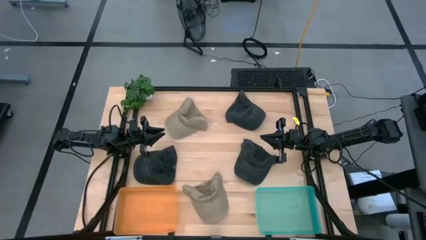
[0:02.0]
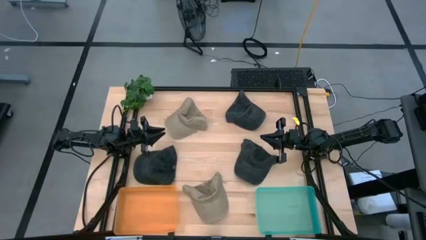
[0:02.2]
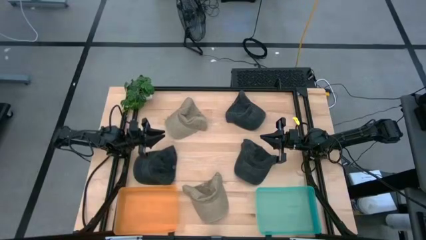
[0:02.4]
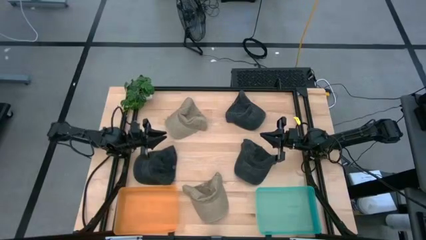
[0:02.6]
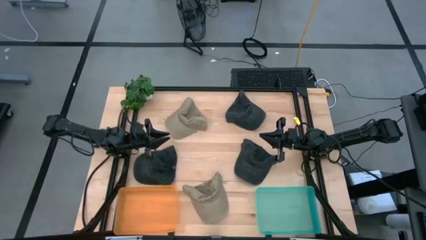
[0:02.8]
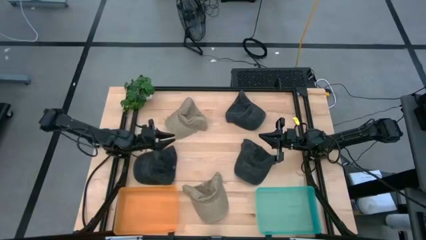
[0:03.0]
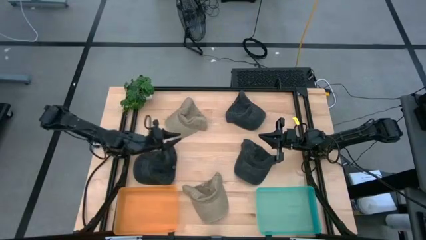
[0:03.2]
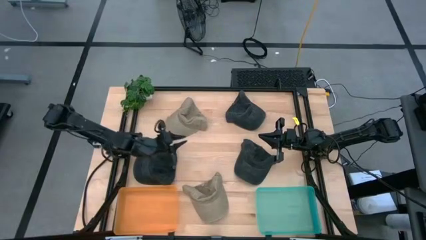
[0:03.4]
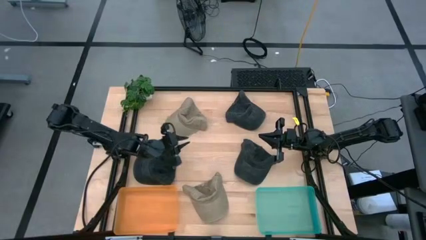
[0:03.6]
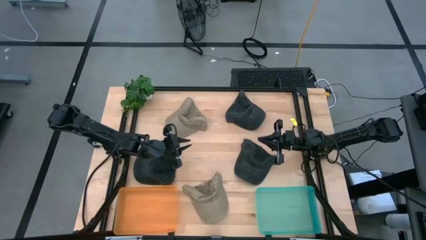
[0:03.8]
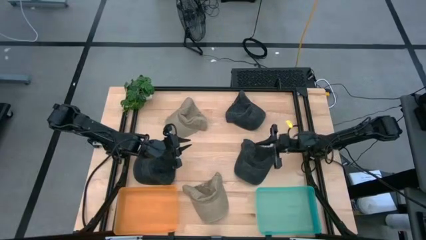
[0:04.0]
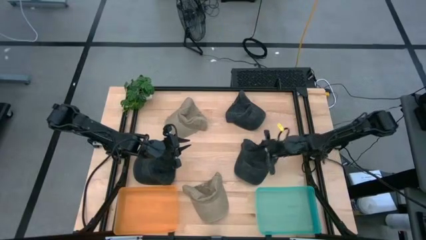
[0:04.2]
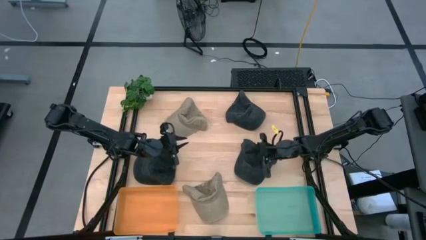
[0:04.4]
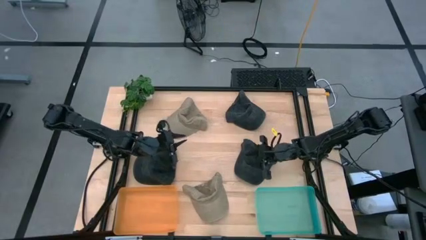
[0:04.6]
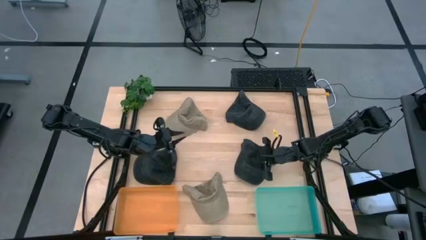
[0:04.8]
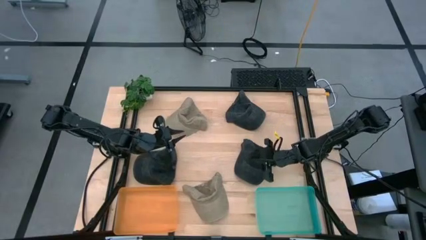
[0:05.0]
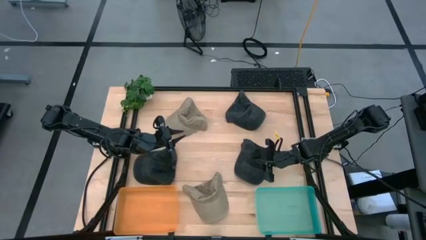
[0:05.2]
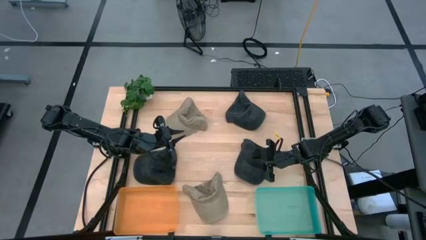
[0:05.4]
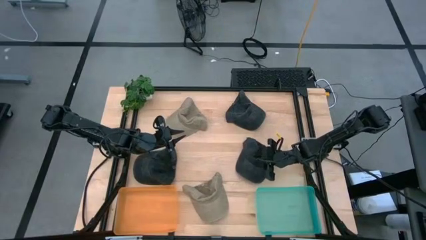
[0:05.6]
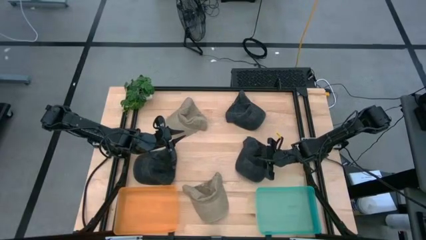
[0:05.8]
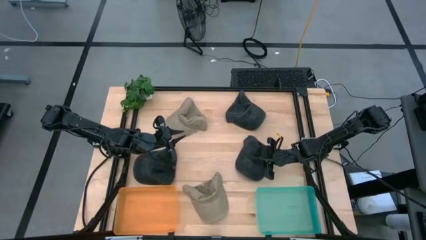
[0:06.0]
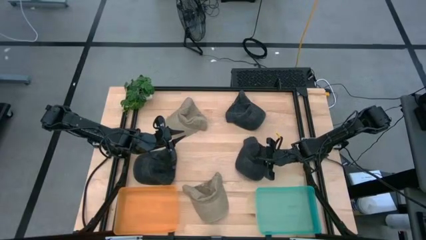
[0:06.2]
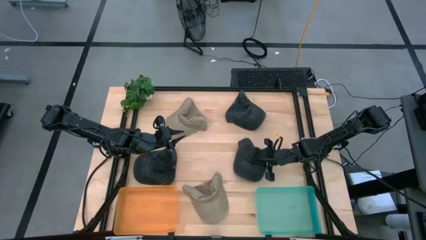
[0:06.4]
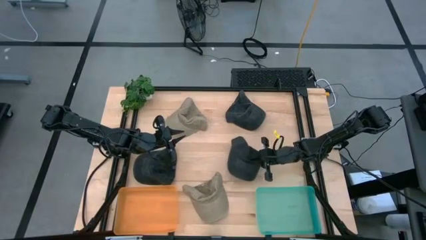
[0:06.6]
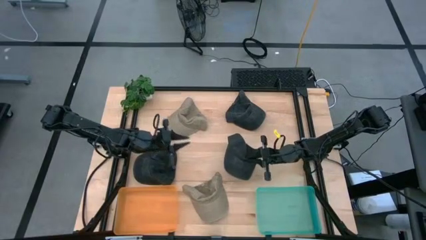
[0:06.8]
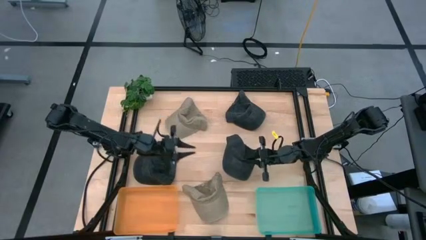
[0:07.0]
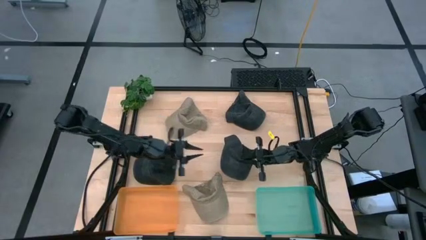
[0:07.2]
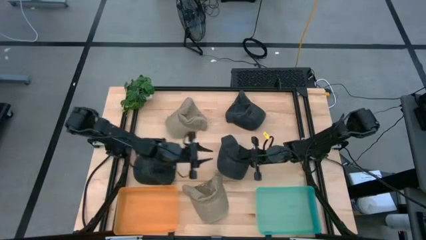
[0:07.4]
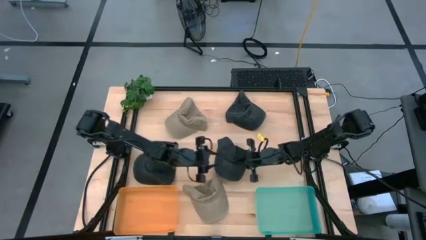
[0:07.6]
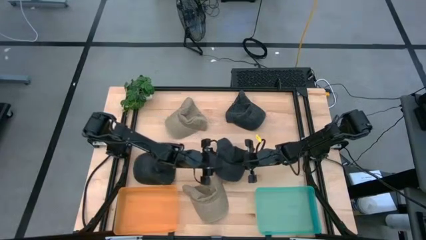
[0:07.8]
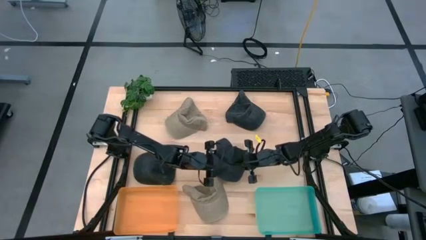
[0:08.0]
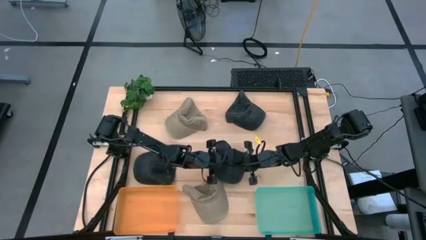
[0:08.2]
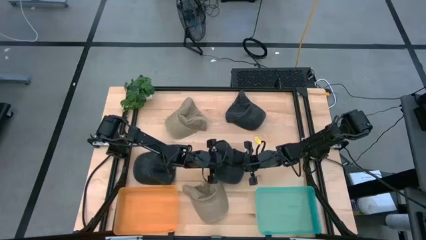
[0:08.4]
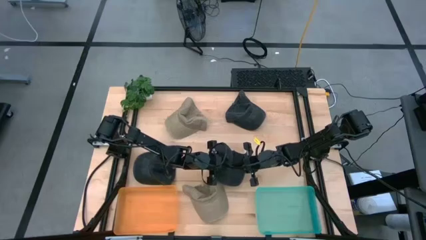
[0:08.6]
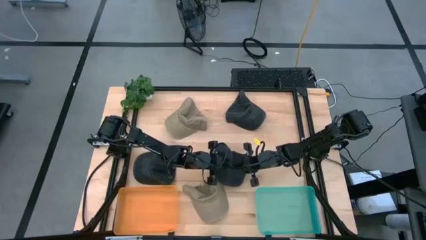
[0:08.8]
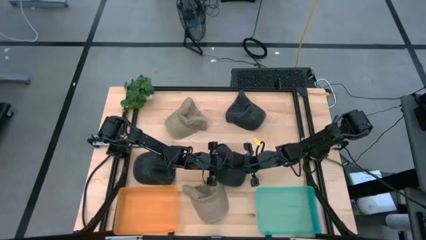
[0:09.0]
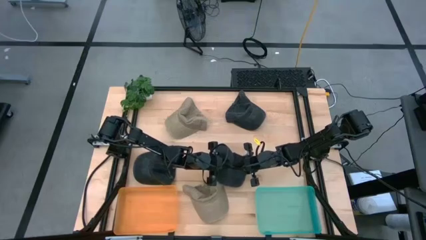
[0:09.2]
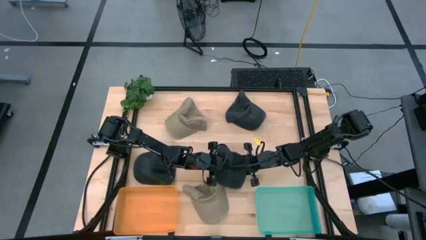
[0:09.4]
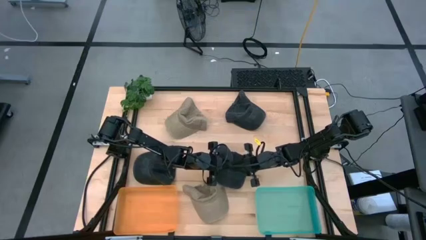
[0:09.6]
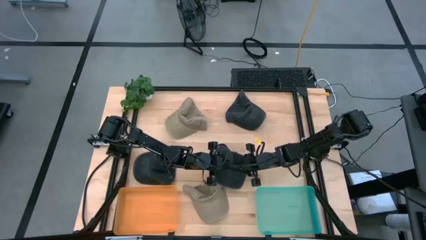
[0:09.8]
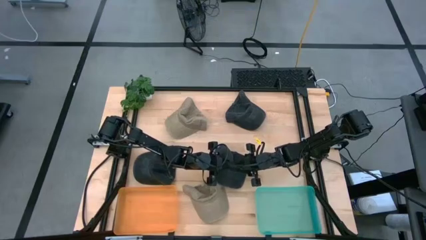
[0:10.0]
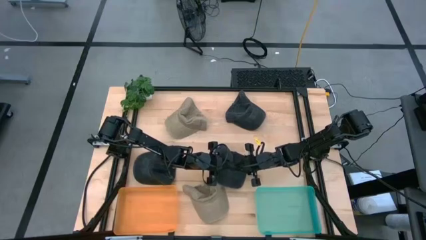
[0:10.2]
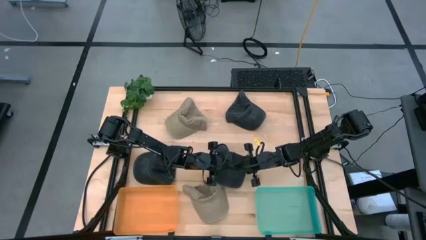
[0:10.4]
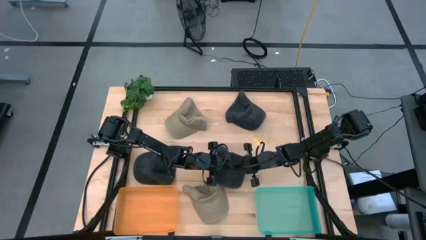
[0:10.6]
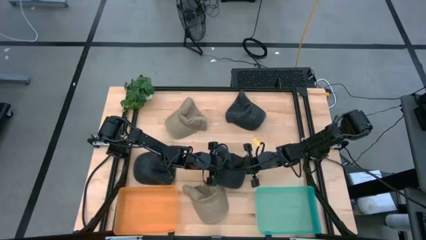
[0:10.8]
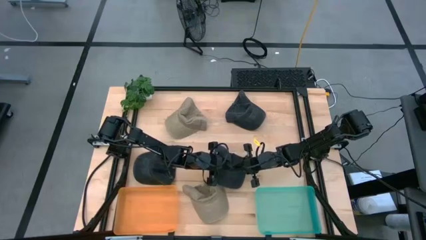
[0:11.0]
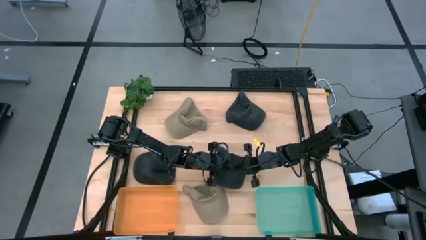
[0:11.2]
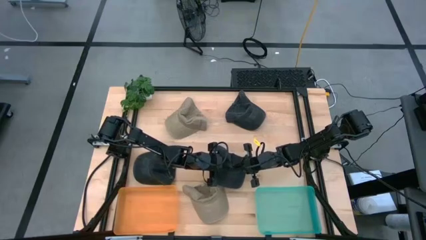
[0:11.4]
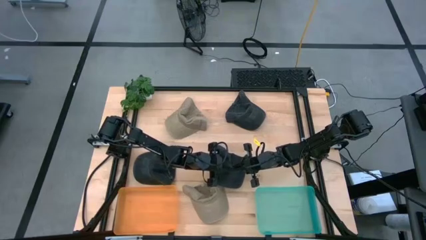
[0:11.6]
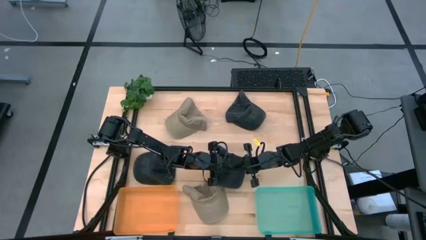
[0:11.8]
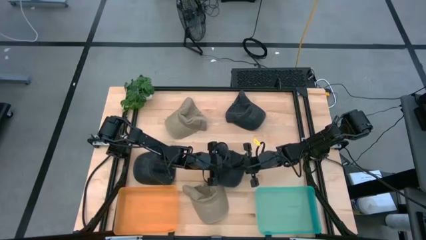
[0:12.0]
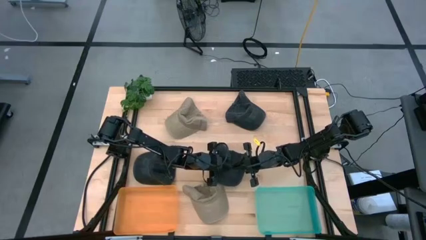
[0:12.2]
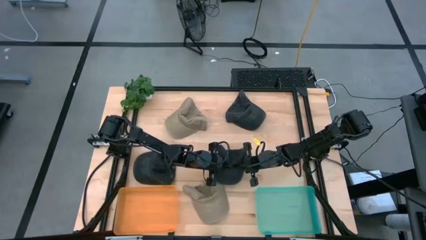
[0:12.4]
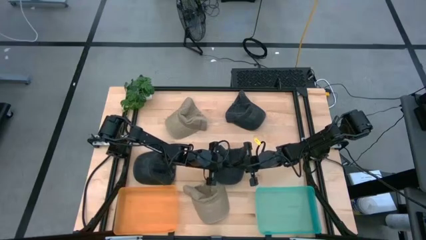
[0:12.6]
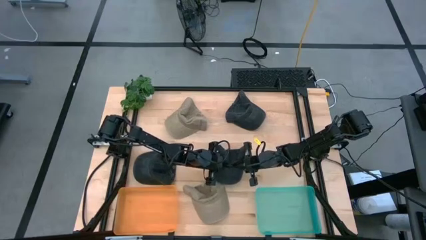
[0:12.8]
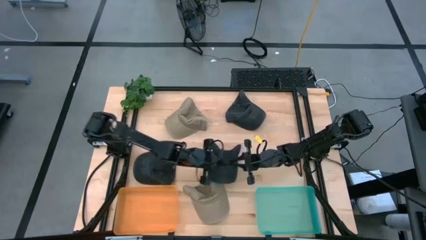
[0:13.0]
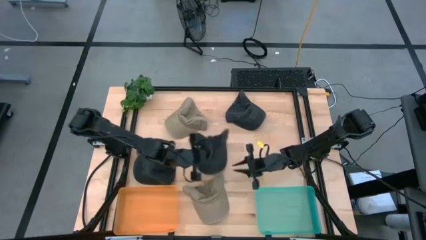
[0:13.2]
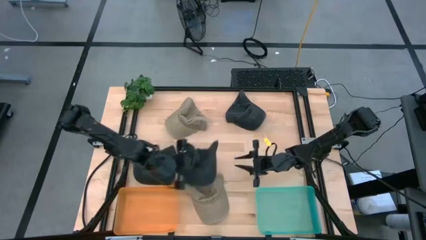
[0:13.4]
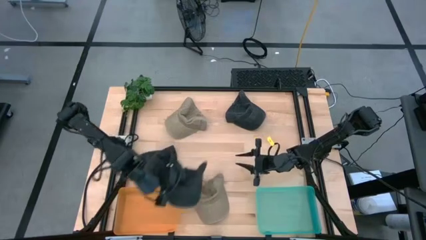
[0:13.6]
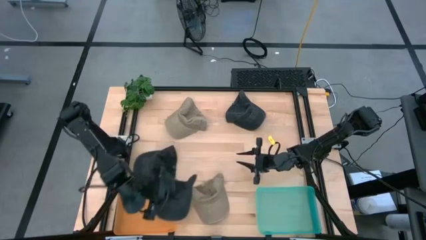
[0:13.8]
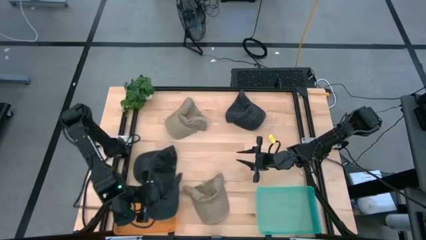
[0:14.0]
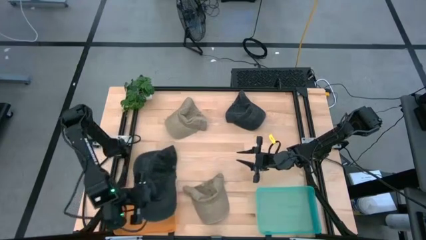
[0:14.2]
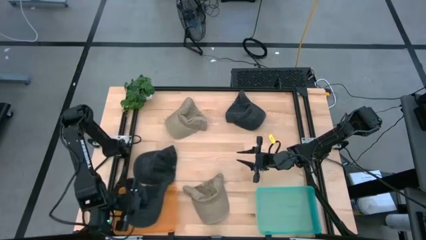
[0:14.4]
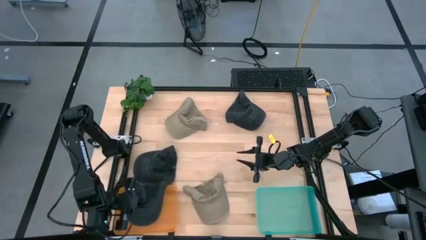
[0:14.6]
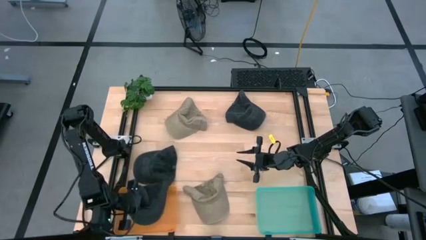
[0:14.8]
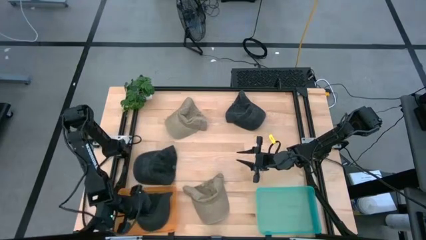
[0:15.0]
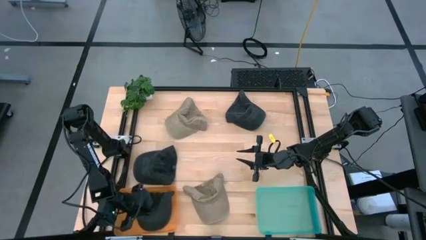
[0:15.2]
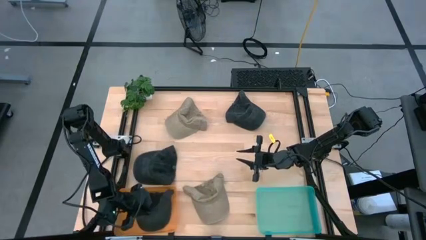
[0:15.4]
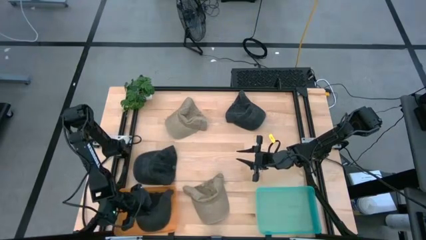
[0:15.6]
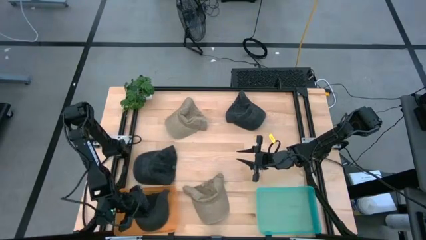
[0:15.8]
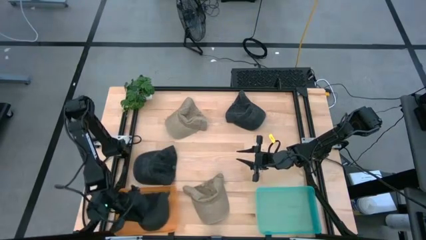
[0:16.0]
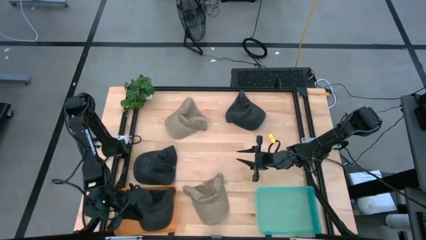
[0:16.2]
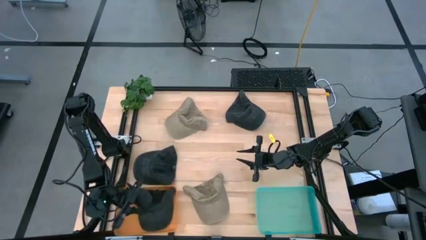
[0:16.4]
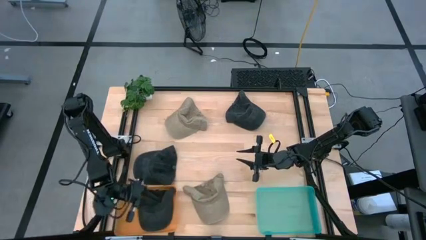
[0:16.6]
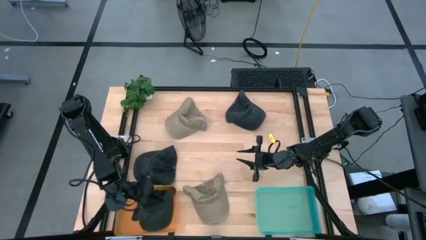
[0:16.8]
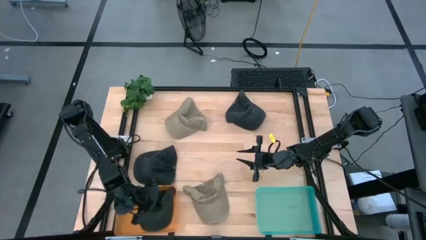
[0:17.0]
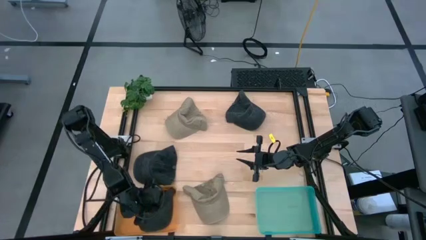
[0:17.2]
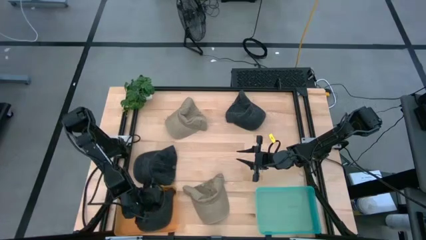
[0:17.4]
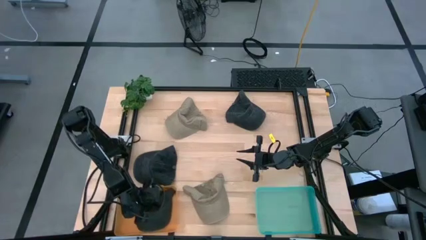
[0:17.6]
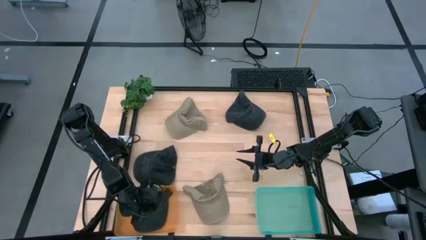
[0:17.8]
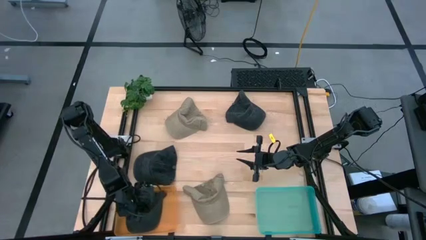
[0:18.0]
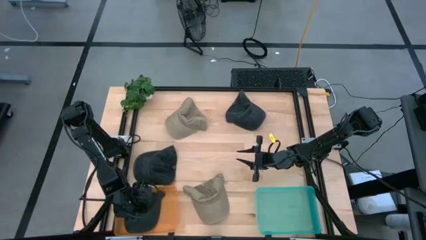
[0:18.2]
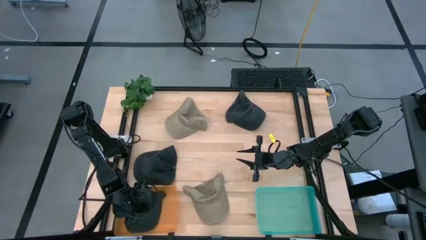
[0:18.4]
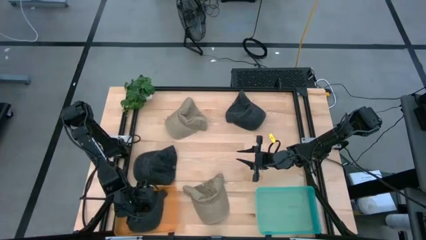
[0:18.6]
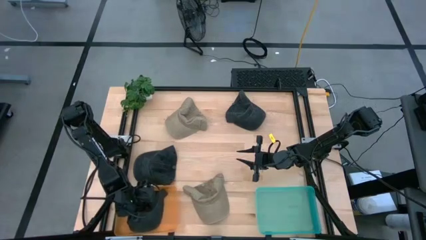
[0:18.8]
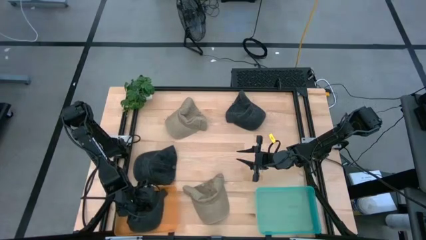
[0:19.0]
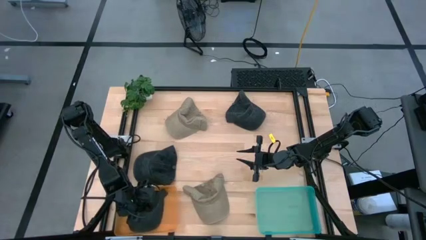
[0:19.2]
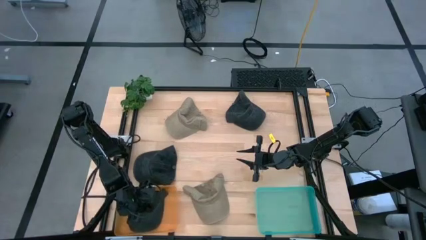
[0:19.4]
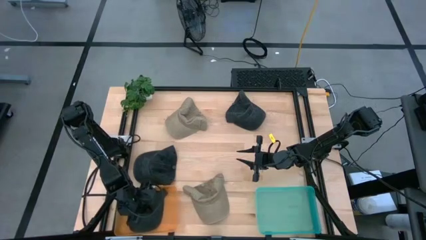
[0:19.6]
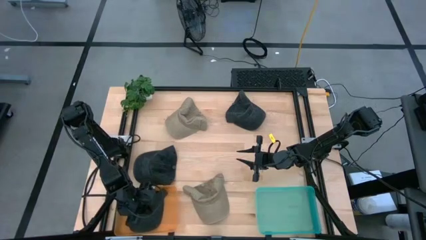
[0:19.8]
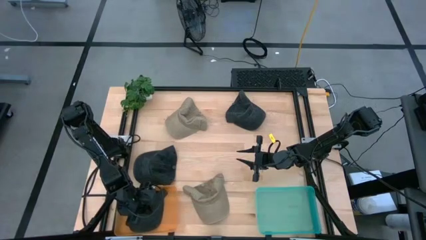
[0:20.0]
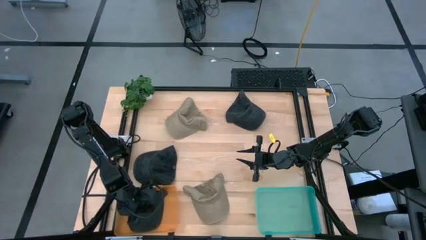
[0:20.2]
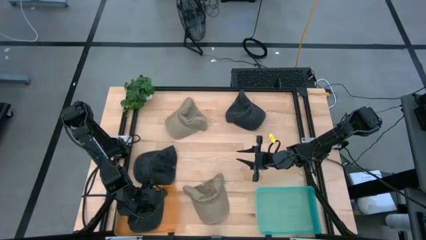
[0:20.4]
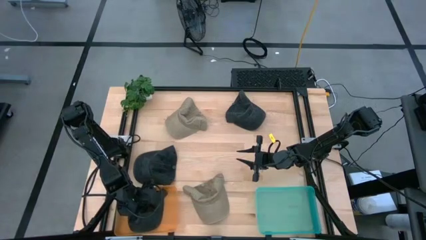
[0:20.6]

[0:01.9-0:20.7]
Task: Pick & Place hat
Put the bottom right black cap into the orange bin
